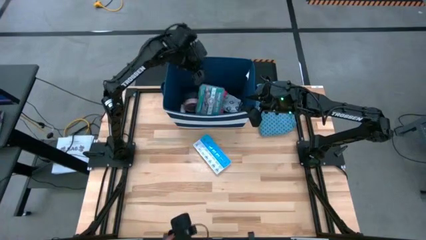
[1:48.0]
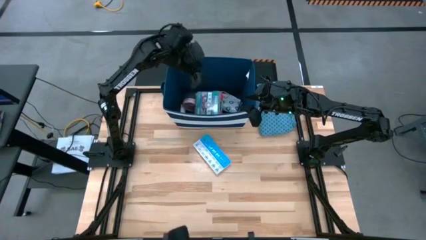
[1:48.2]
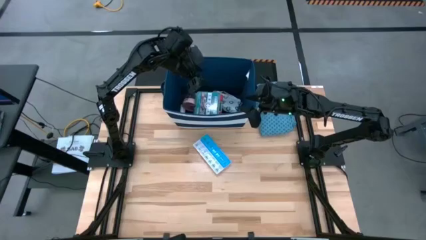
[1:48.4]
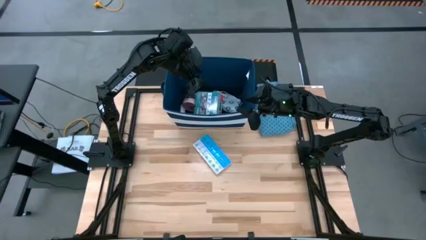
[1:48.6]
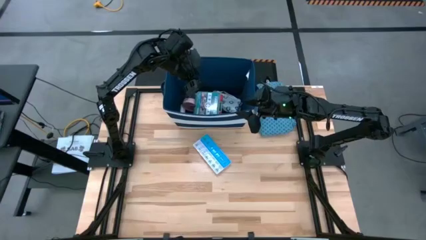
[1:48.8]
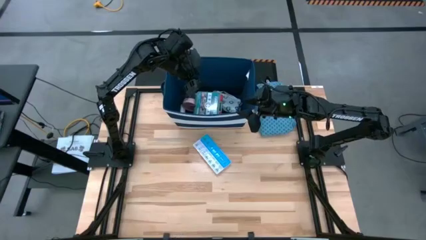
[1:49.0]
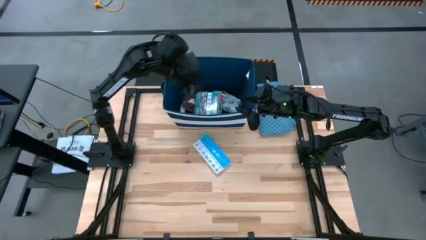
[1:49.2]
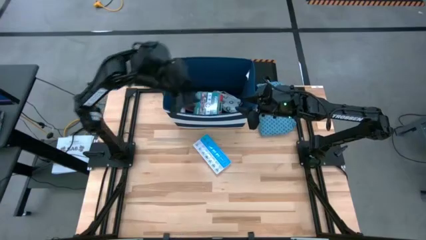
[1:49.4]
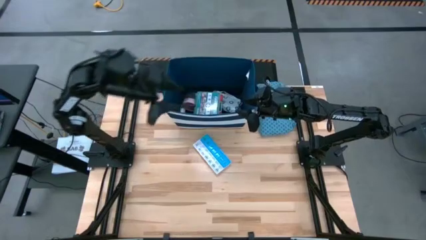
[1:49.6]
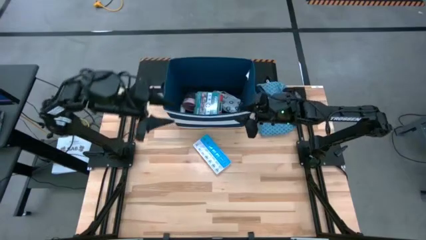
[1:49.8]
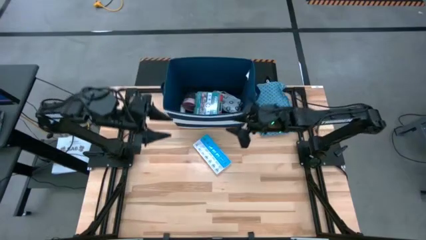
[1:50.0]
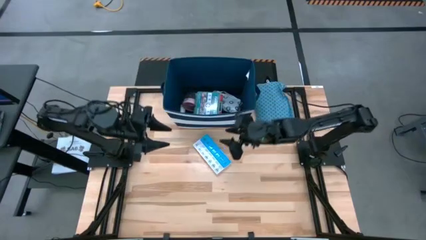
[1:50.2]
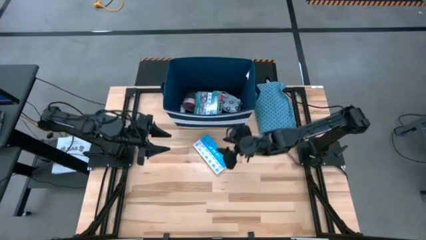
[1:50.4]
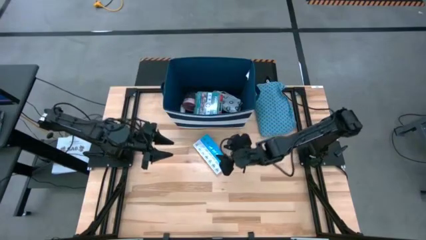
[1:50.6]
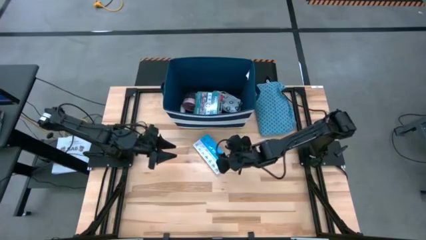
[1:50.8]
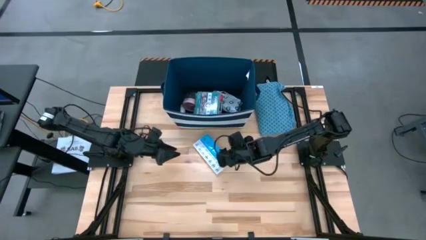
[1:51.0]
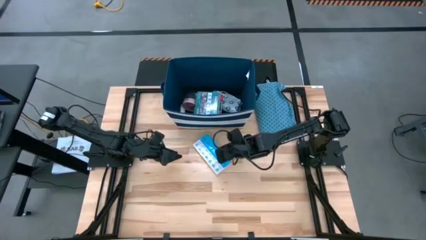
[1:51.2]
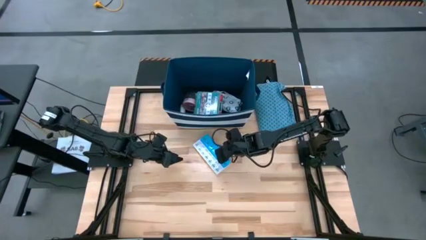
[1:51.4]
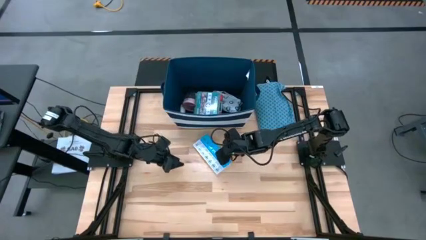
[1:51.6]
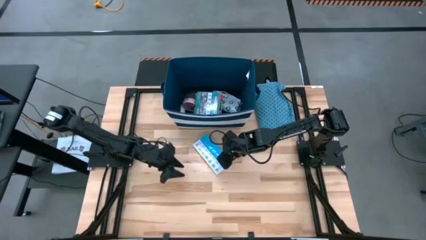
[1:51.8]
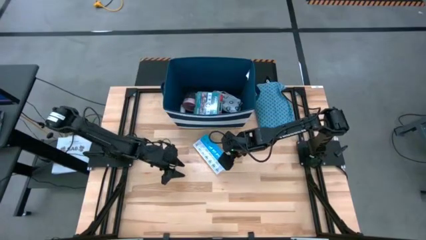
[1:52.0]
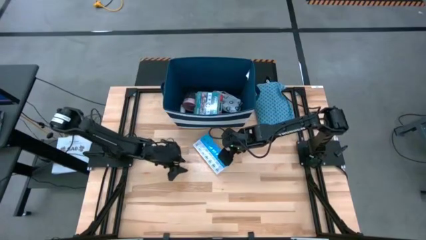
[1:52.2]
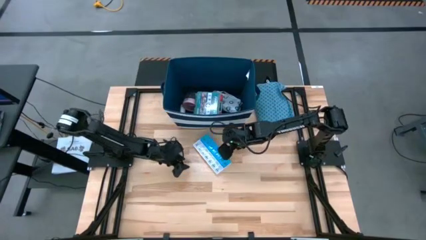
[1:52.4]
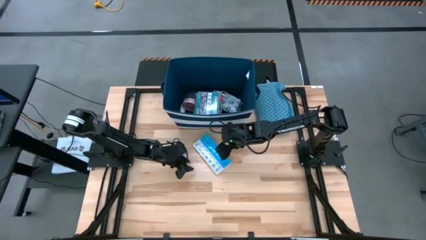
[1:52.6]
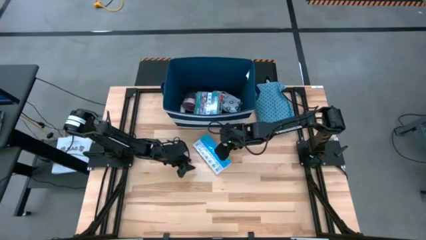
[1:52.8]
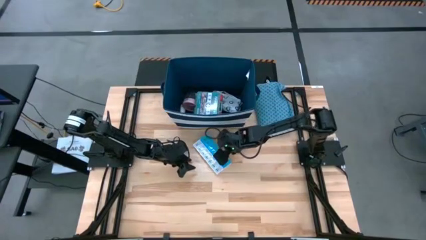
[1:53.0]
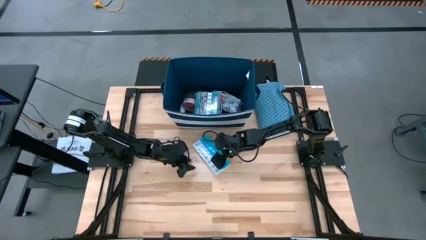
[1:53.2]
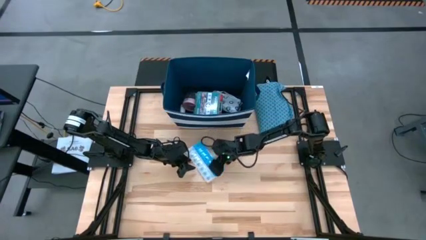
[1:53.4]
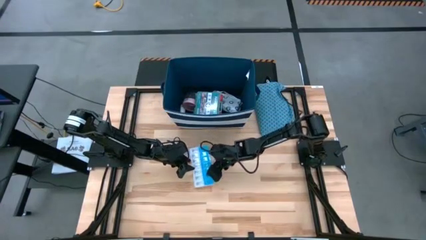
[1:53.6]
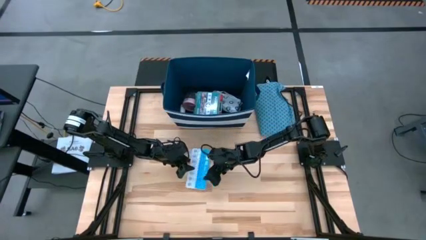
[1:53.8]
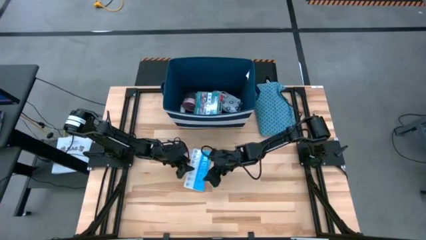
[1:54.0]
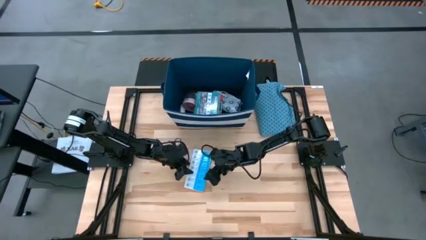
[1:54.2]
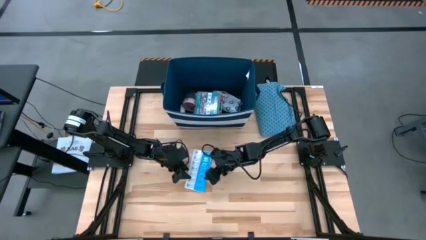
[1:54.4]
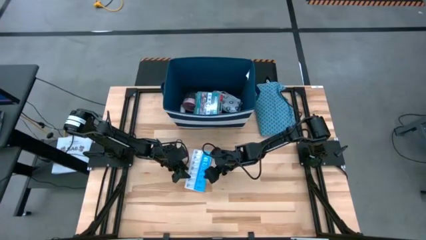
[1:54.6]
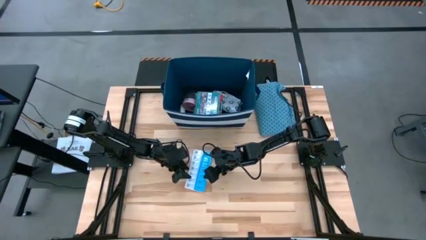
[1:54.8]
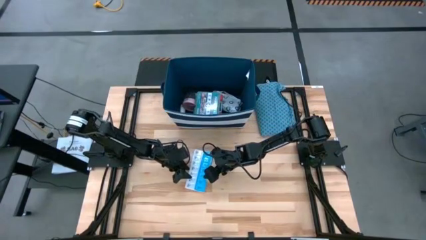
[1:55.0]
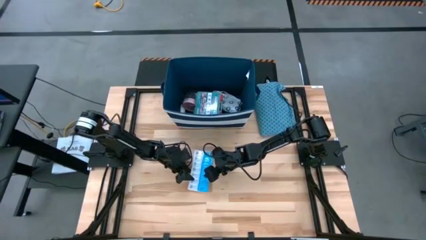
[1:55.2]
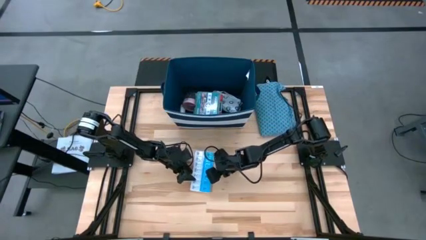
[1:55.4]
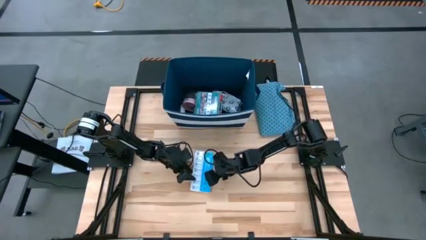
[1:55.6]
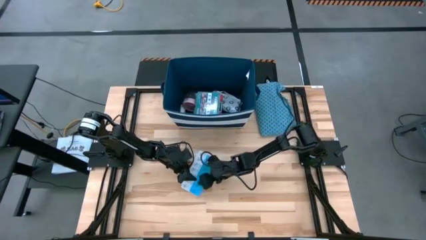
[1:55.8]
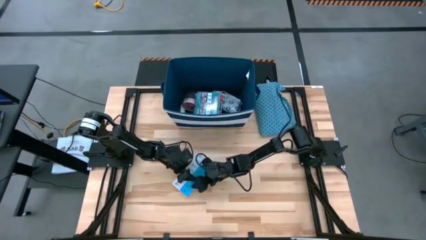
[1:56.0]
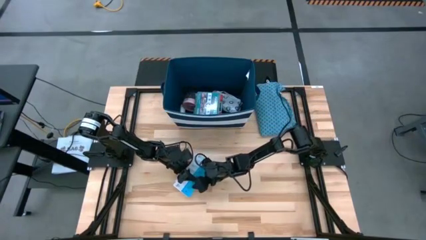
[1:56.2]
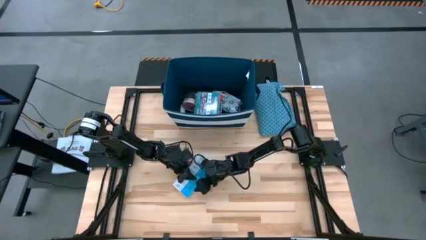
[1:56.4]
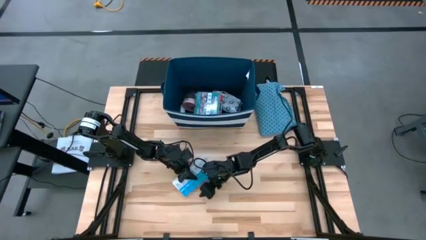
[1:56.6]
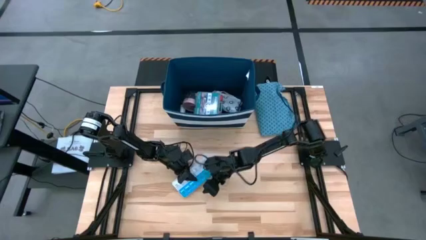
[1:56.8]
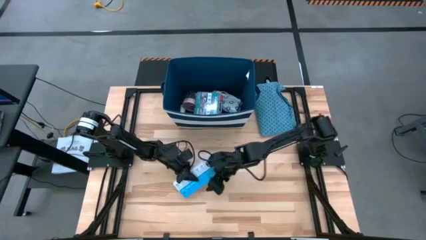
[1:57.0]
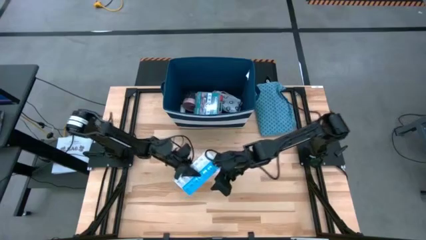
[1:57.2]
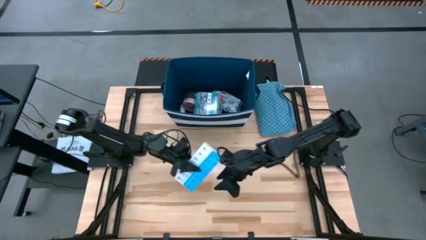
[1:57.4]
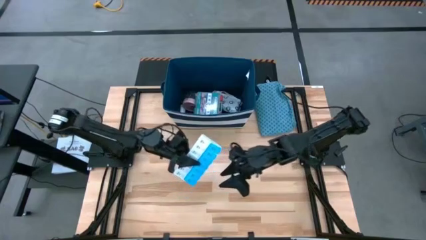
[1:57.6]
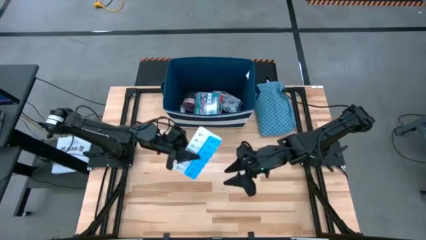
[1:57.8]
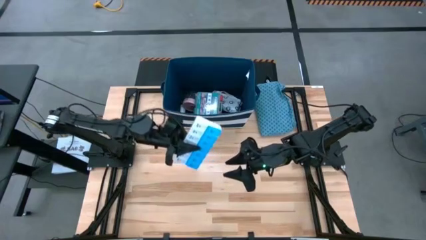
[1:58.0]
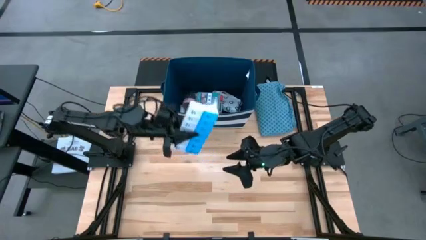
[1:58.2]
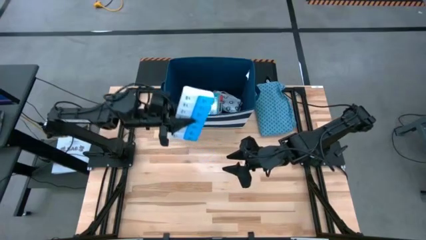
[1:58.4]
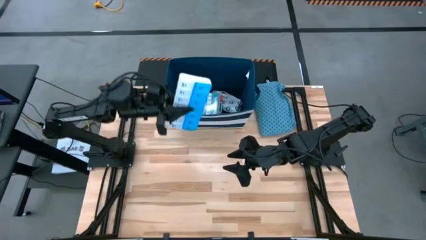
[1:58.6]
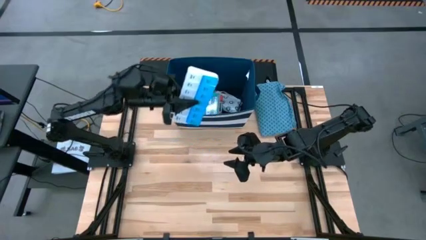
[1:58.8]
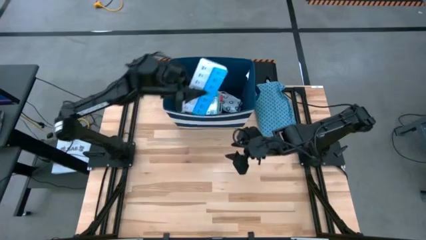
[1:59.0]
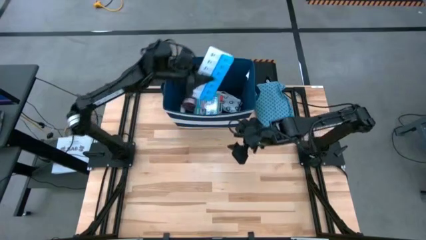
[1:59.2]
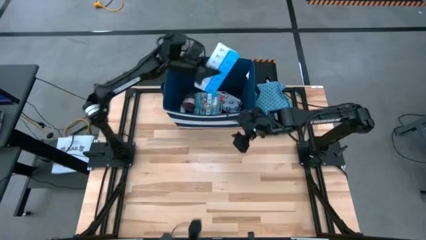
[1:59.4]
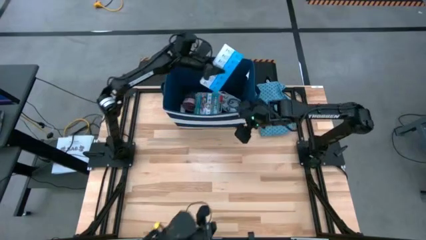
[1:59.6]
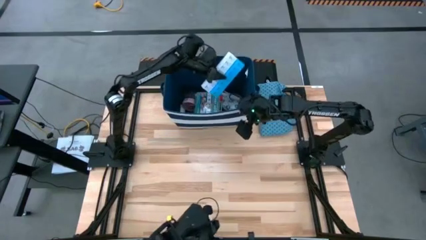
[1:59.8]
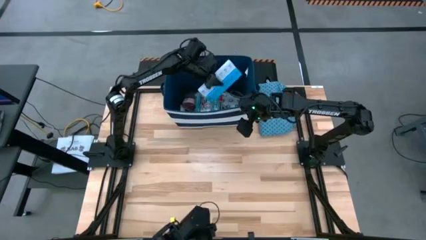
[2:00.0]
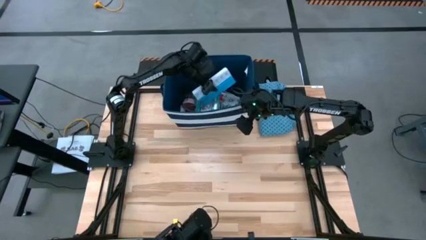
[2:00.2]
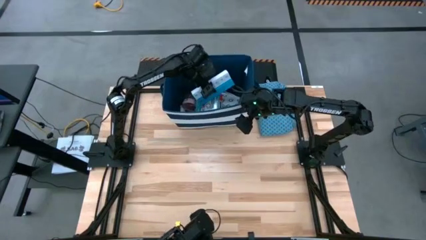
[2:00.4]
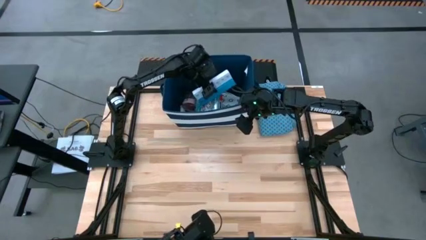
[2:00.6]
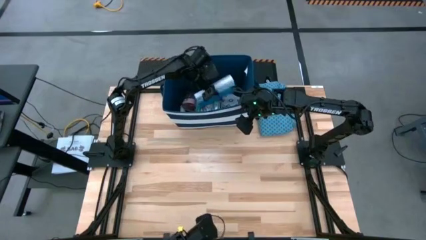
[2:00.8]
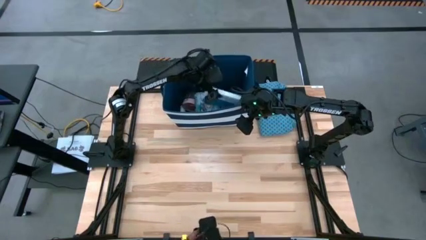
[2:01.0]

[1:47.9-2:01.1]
Task: Pick & place medical supplies in basket/bin
Put the medicine organizer into the bin
